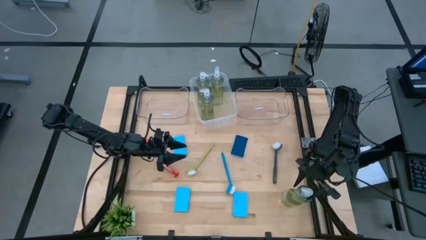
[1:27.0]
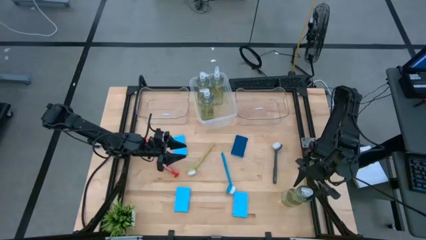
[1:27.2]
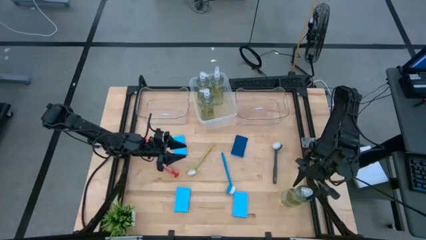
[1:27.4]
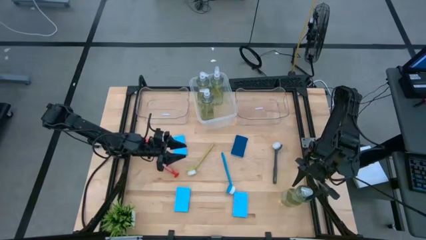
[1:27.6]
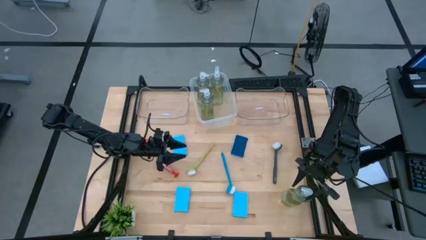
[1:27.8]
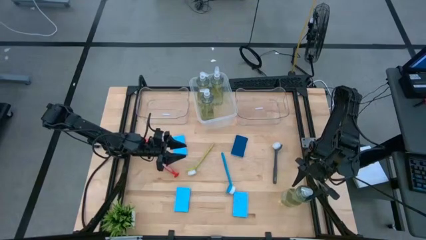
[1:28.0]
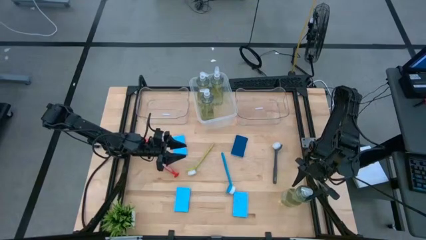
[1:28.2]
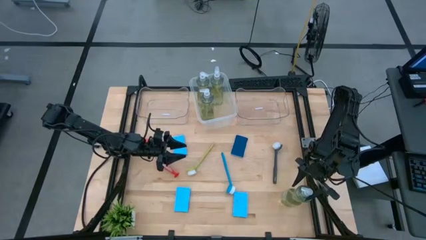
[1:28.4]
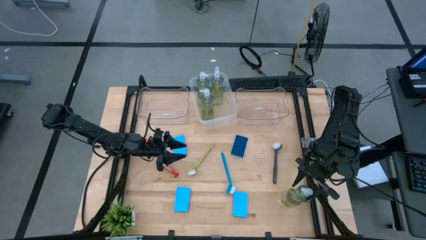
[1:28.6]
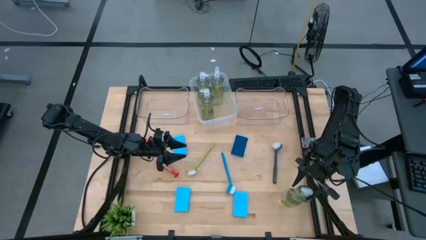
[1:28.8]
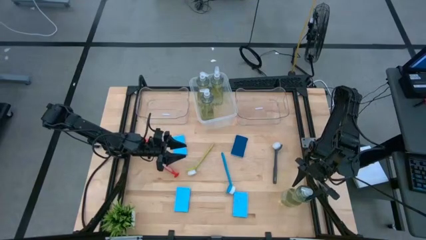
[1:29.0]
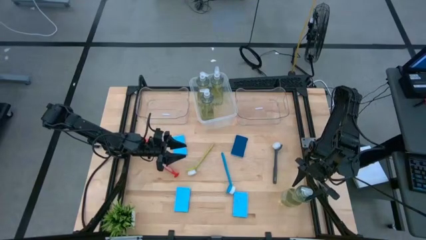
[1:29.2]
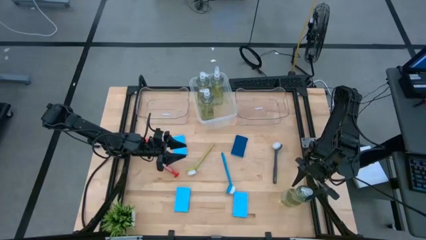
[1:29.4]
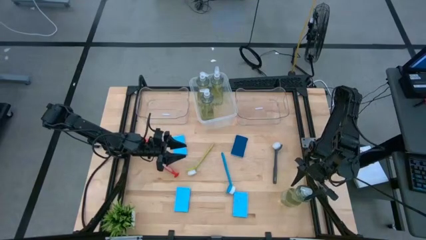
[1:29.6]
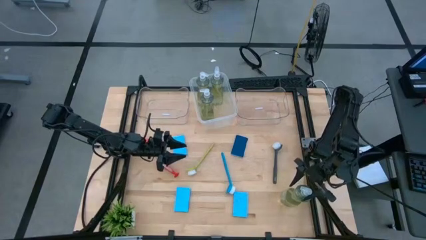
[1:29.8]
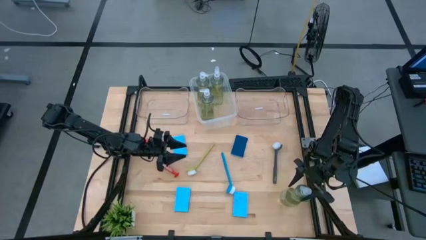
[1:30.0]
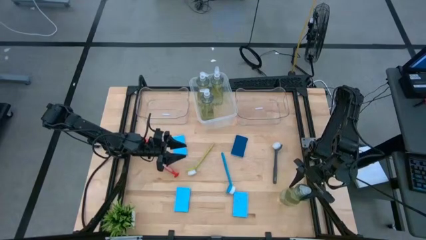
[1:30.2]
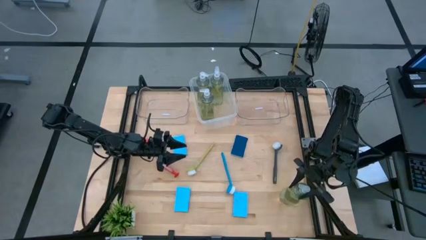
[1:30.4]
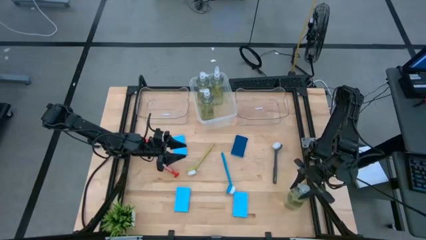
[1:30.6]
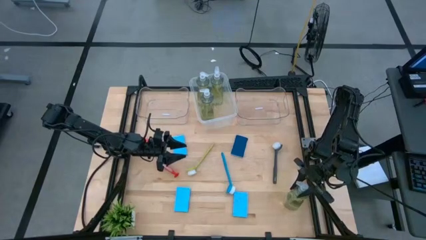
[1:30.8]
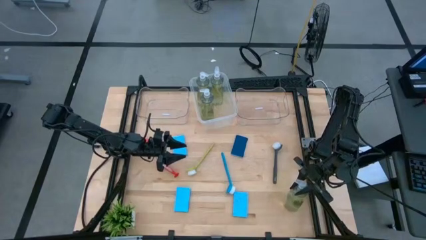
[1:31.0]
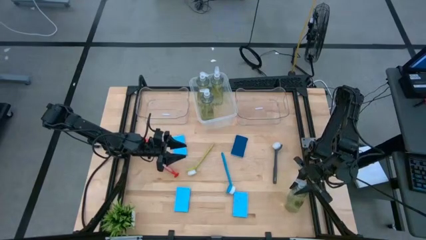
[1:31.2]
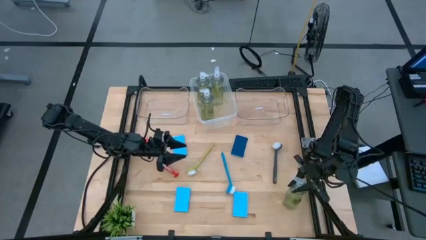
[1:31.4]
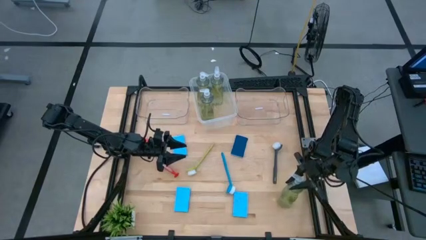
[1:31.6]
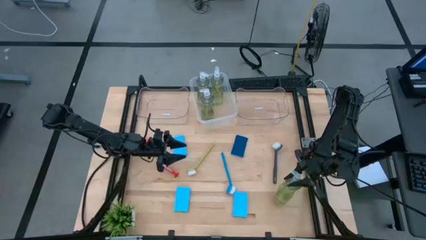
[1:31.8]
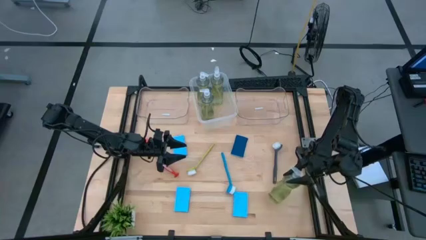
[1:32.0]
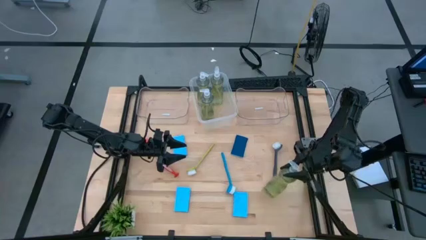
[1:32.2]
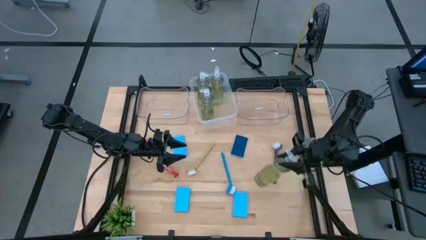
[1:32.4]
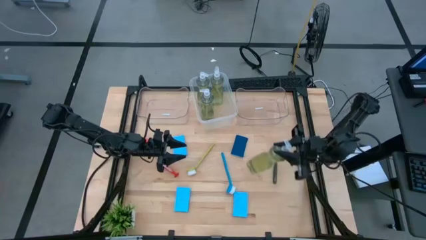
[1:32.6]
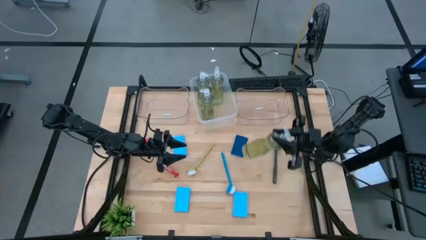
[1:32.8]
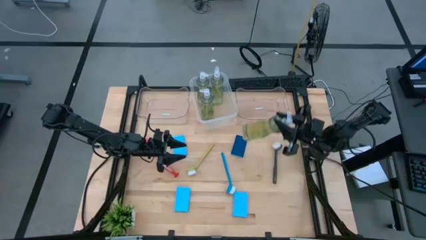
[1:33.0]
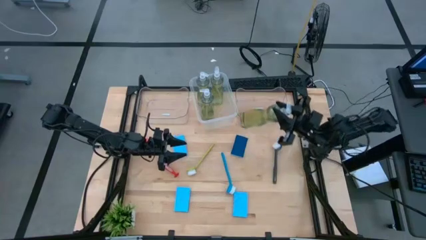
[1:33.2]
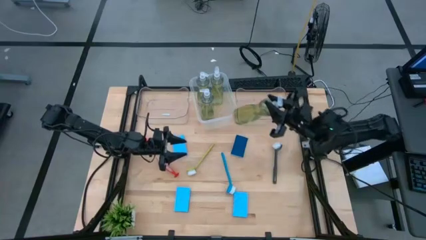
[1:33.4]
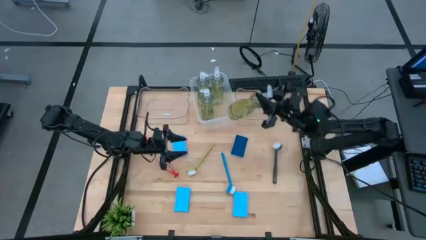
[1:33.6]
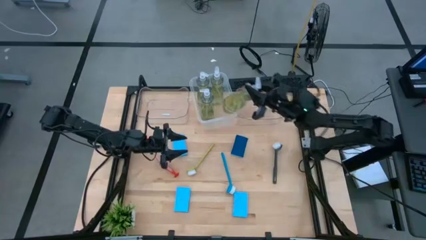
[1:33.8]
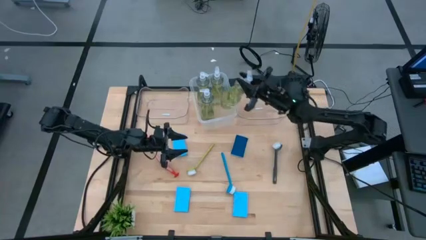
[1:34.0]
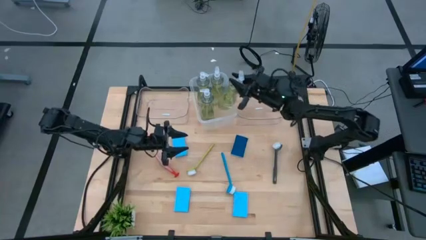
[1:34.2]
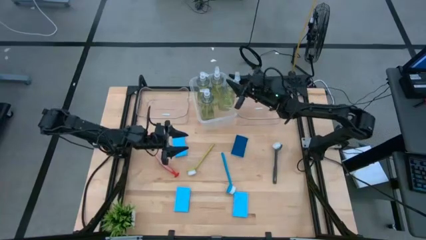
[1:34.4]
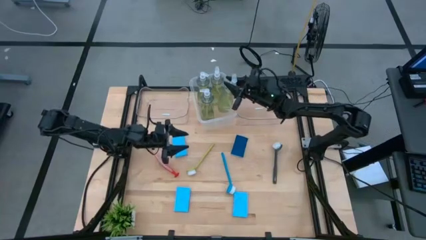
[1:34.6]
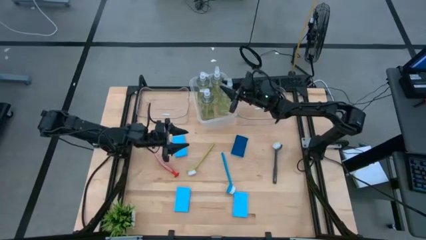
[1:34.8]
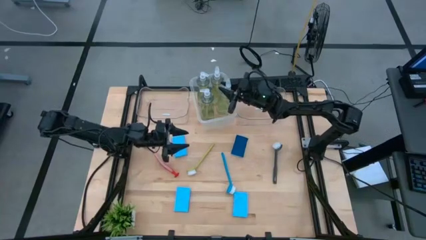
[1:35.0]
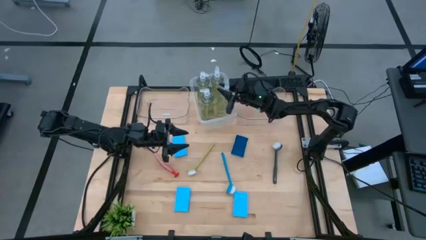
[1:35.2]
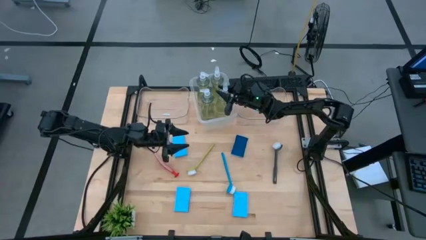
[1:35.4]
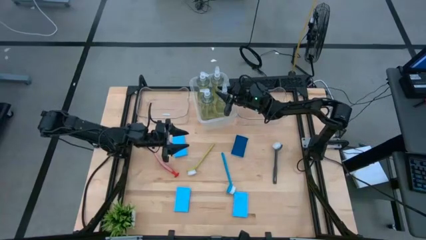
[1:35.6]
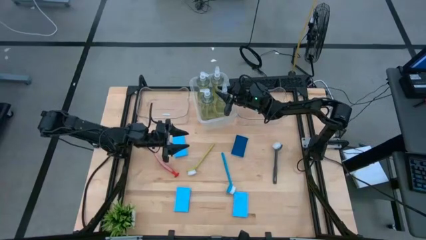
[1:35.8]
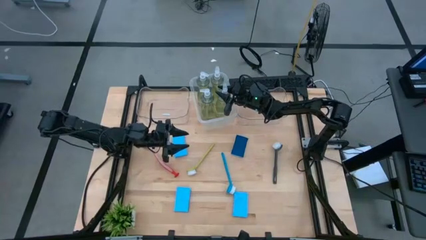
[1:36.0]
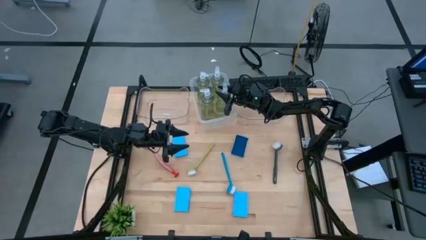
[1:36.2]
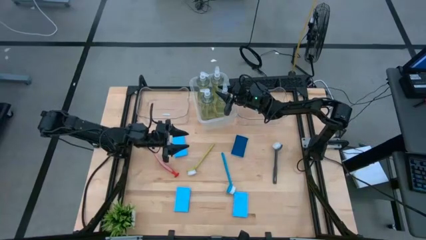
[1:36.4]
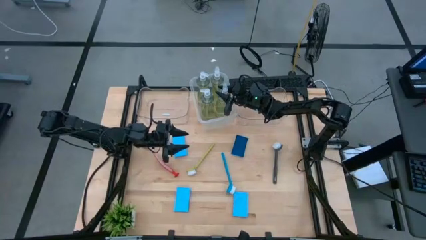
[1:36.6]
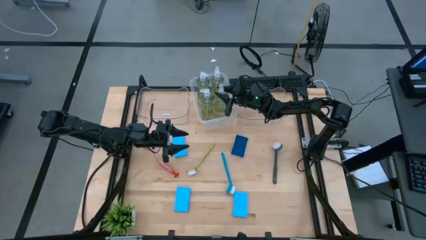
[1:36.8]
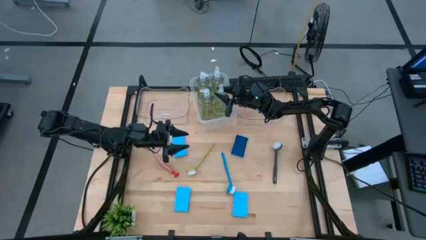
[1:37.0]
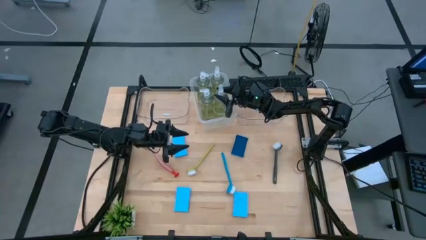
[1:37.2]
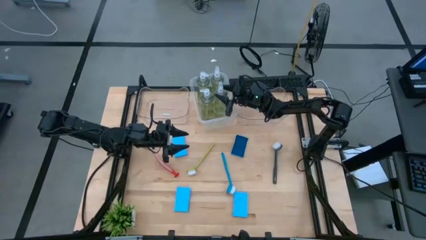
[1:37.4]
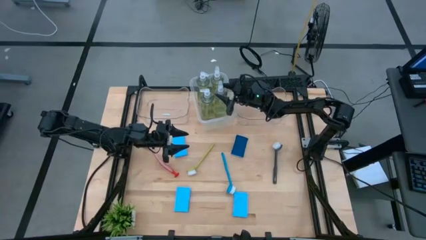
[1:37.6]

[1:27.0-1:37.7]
Task: Pick & Place Kitchen Sink Supplies
Put the green soap dispenser into the transparent white bin

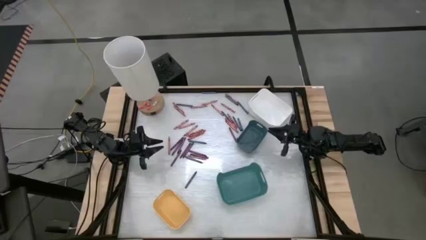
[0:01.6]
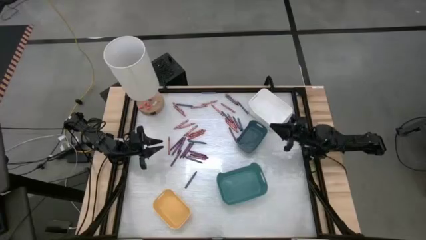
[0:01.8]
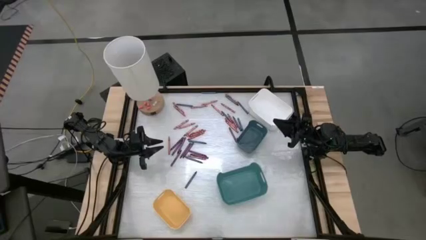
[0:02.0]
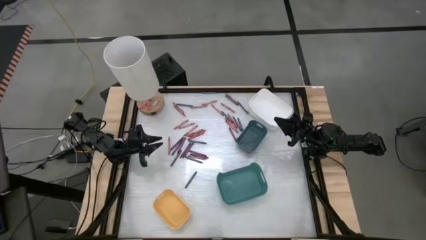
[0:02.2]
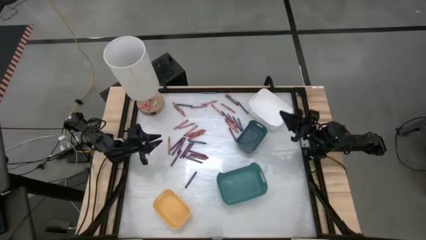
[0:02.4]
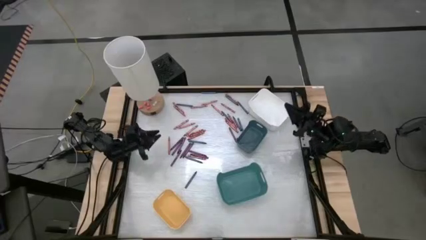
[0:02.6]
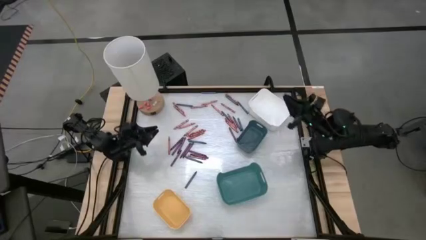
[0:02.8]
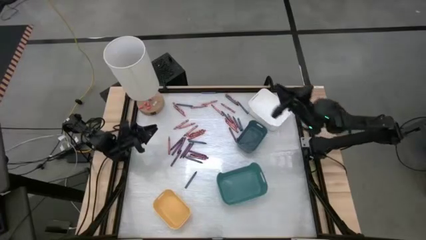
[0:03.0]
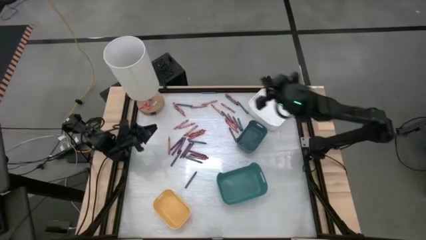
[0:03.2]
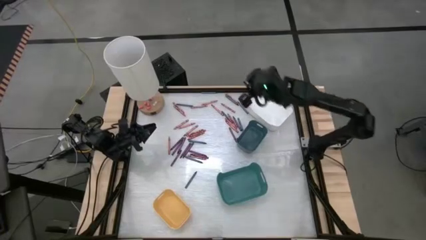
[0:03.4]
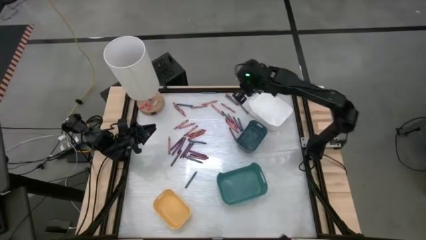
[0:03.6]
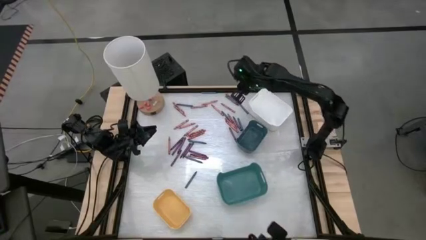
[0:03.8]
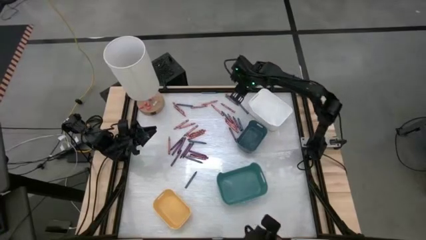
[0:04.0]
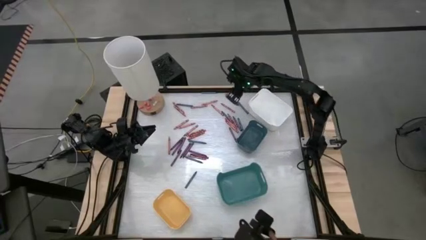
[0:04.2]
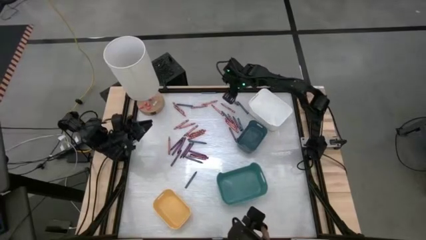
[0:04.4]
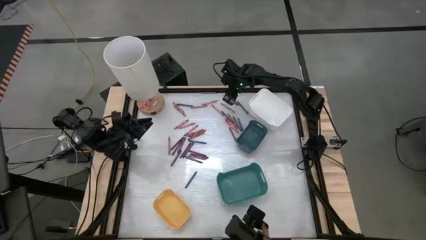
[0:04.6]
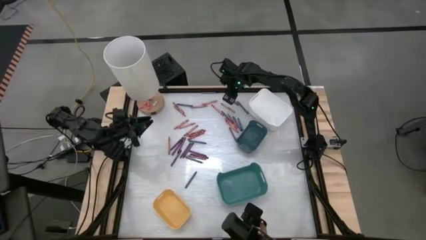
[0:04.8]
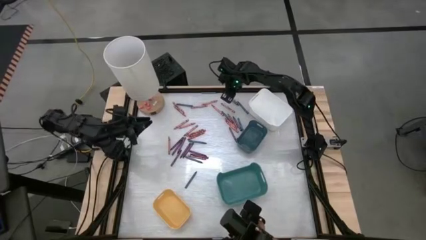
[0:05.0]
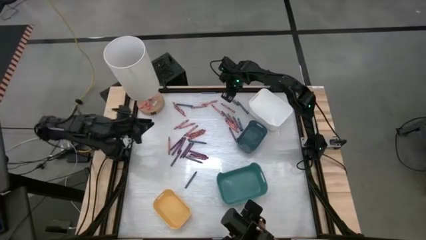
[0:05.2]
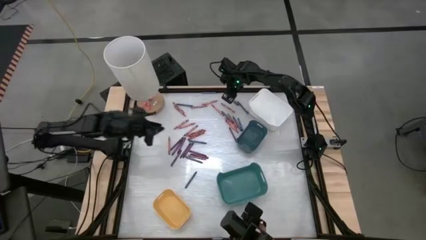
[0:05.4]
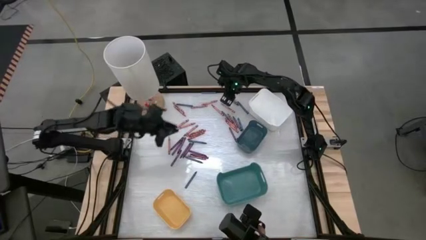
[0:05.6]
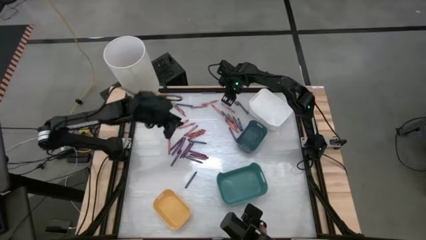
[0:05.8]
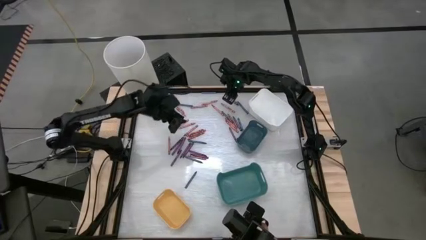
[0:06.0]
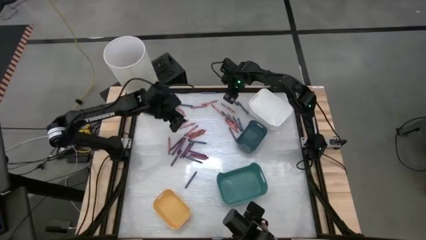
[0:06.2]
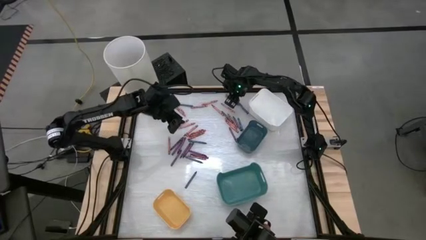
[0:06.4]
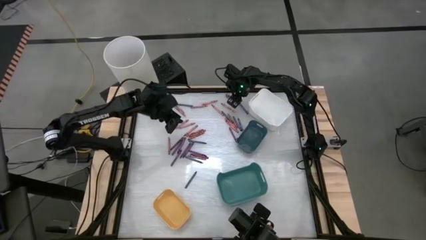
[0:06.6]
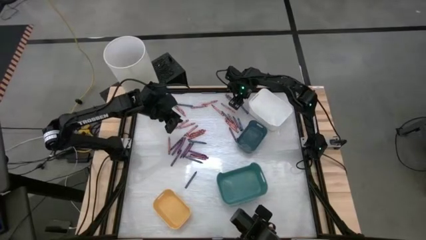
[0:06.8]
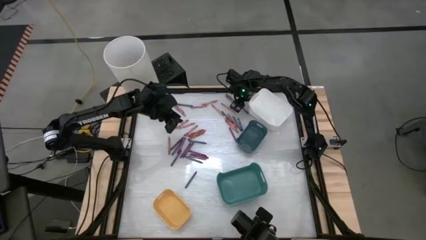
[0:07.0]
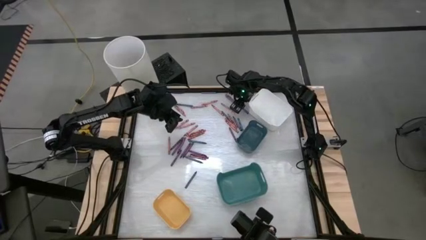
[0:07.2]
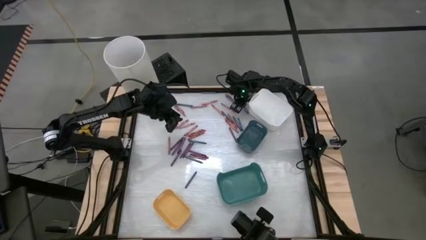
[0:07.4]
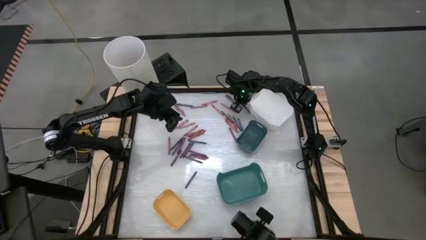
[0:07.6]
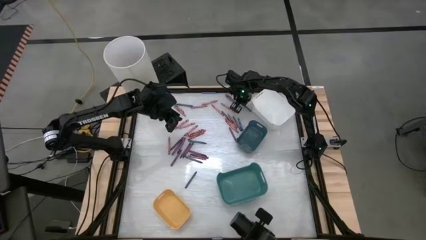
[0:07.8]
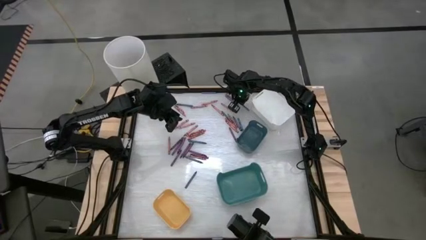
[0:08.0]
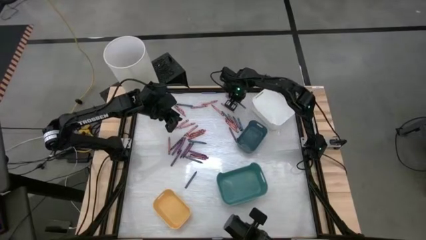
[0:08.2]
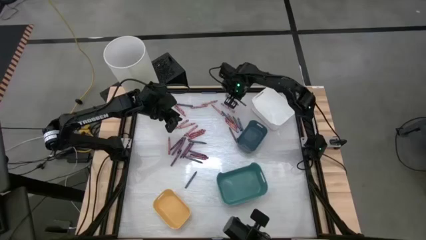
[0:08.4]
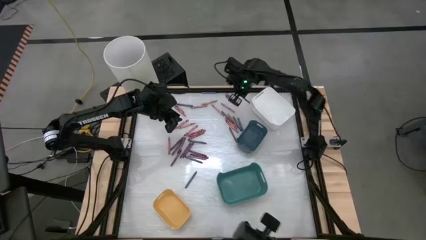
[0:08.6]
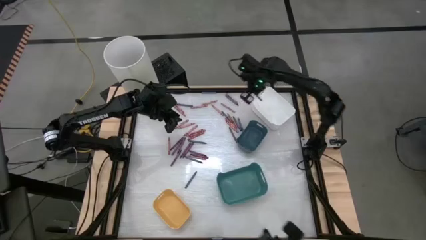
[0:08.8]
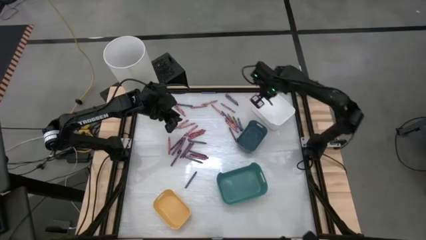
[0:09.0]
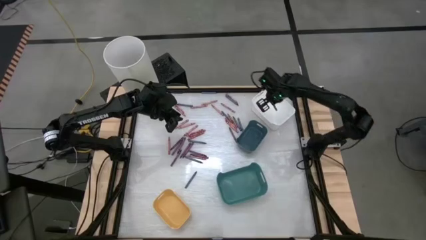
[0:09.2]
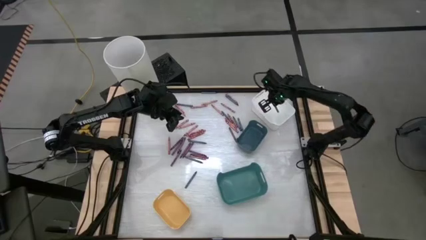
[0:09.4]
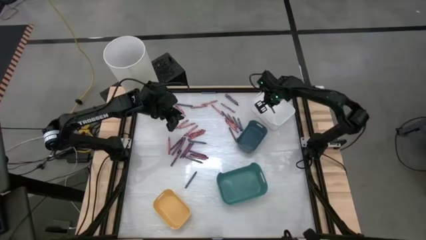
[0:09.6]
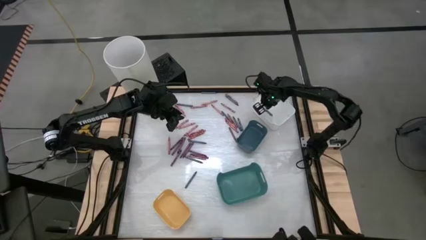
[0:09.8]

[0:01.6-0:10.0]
Task: Sort crayons
Put the blue crayon into the white bin
